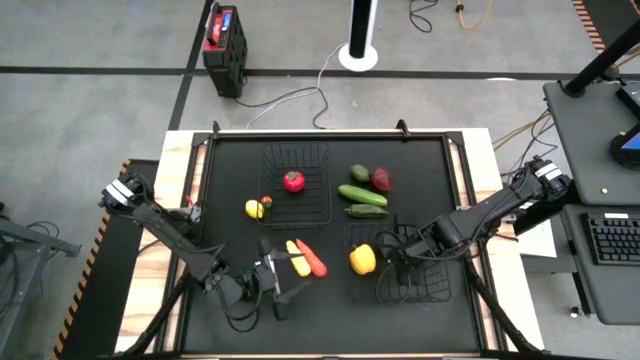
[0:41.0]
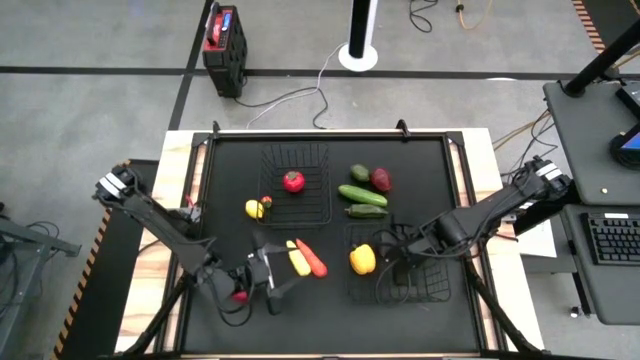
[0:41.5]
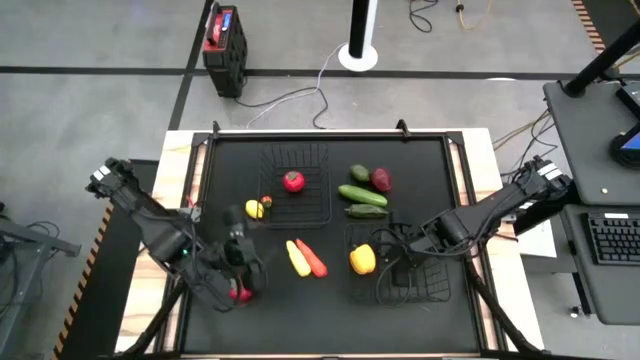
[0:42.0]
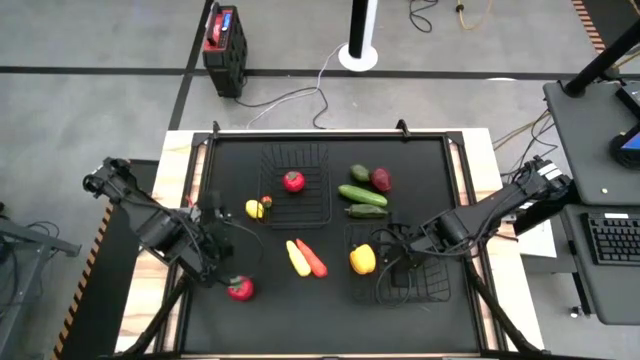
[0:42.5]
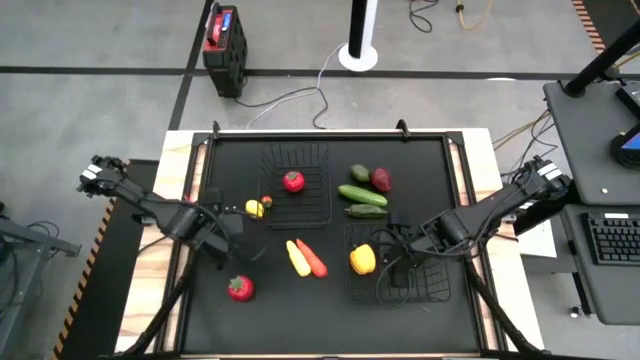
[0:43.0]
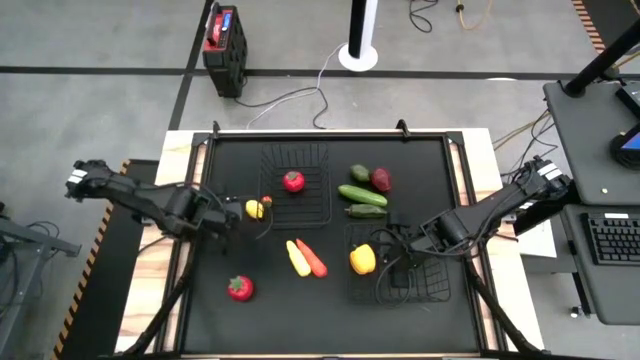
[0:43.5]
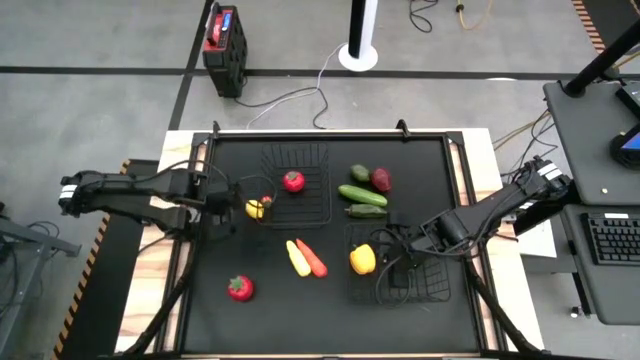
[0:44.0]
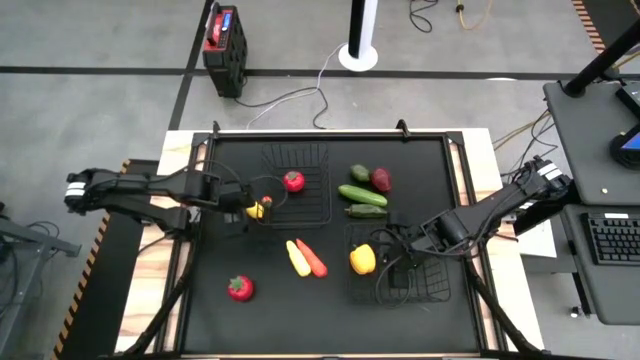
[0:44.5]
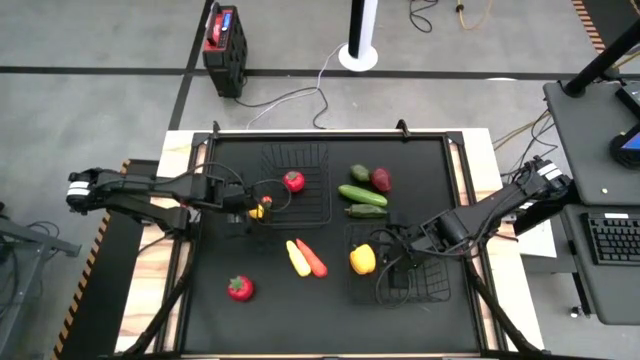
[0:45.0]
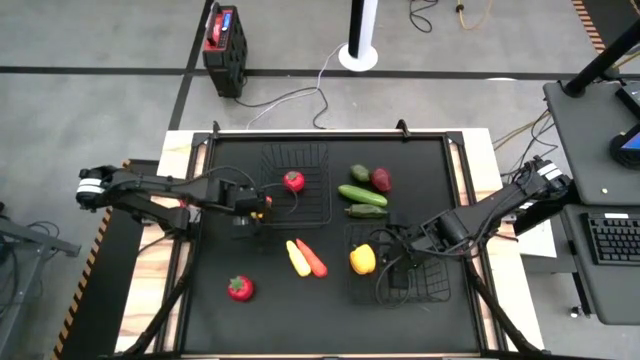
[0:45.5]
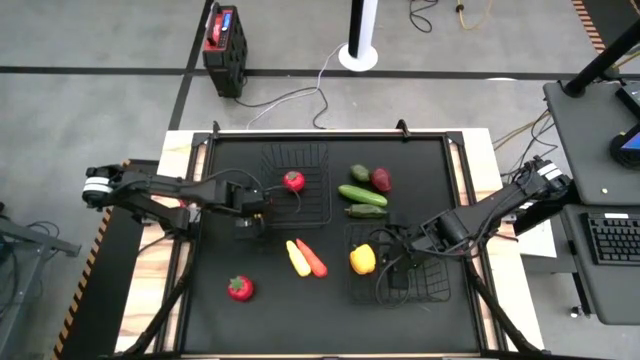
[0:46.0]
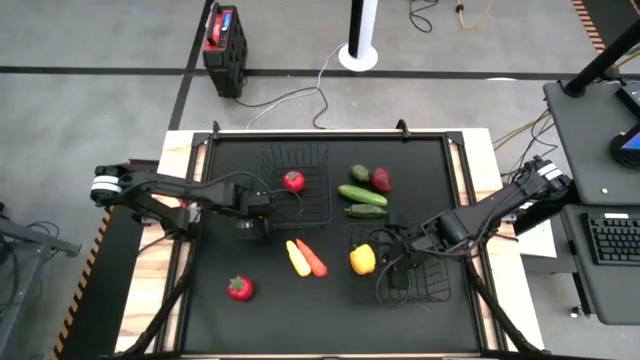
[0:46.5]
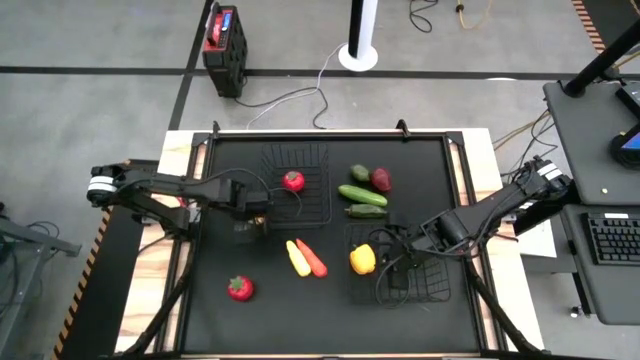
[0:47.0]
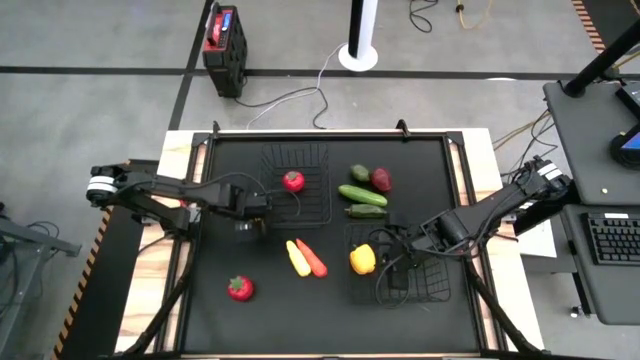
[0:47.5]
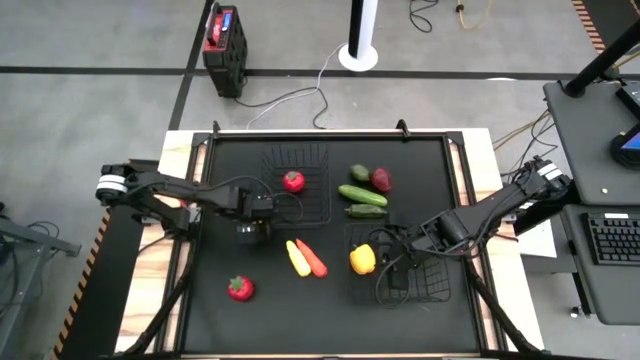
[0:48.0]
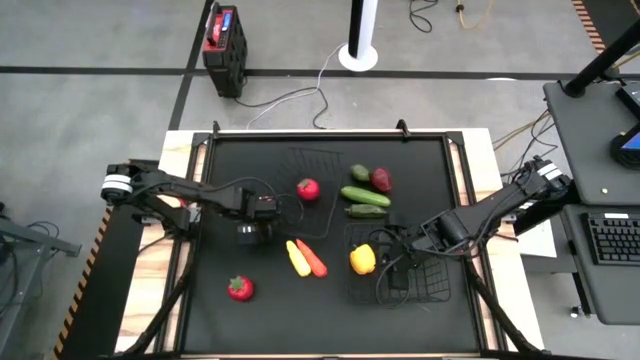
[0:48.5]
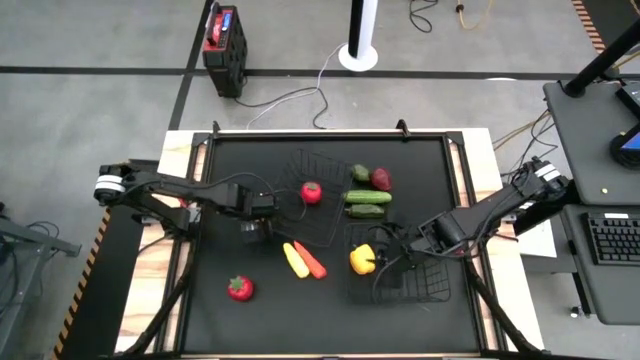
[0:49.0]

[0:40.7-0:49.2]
Task: Sort produce into baskets
Put the yellow lemon into the top black wire basket

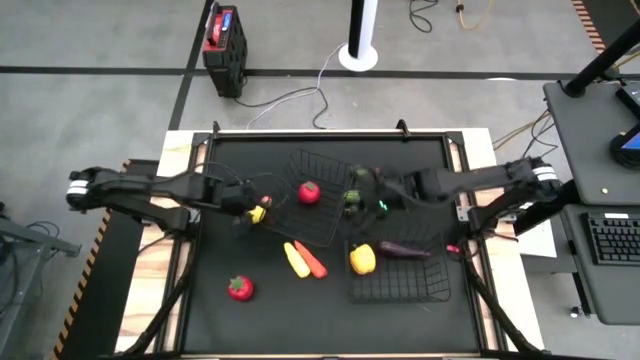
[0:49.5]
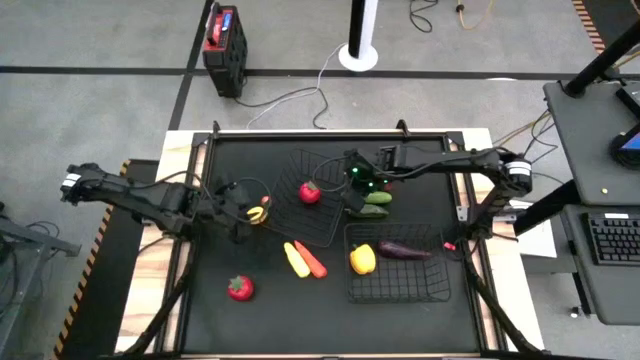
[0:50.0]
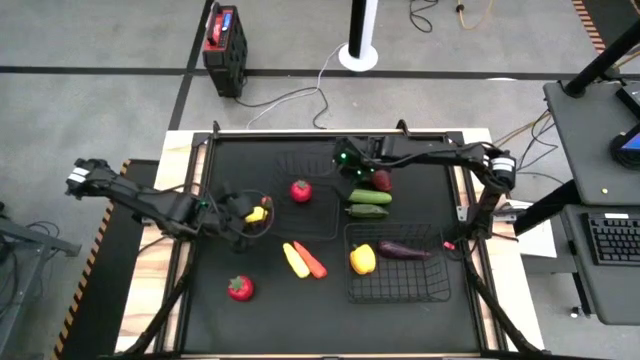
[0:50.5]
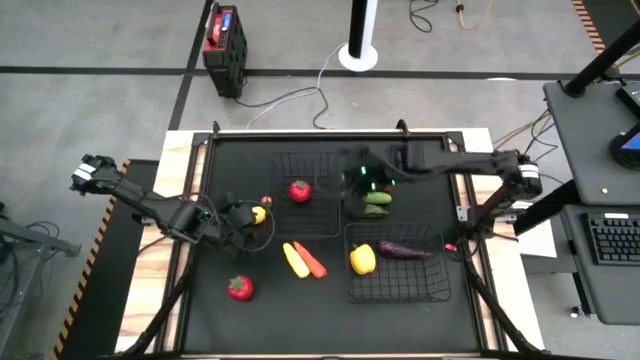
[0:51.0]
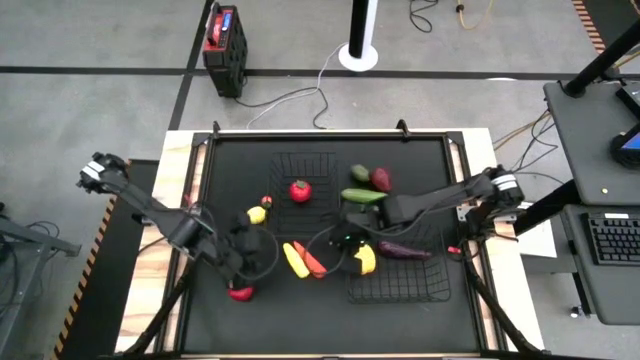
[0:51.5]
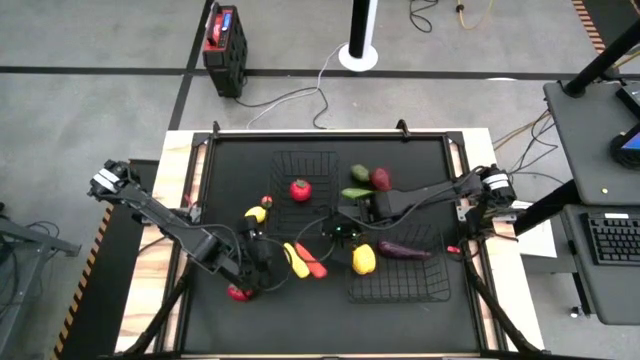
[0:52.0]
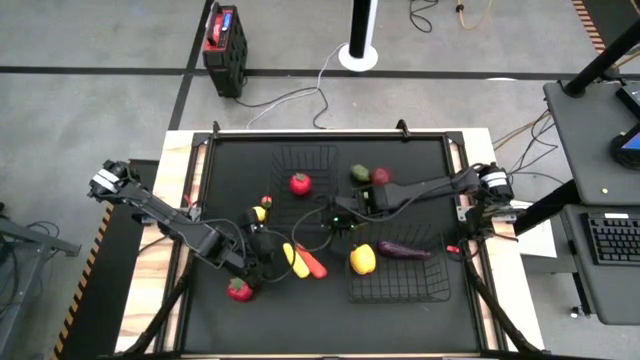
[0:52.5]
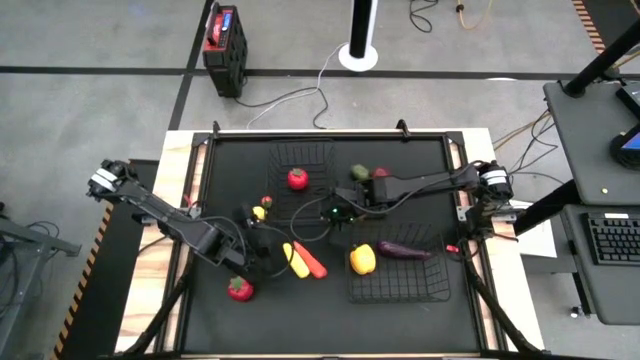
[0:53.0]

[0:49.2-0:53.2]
Adjust the top black wire basket

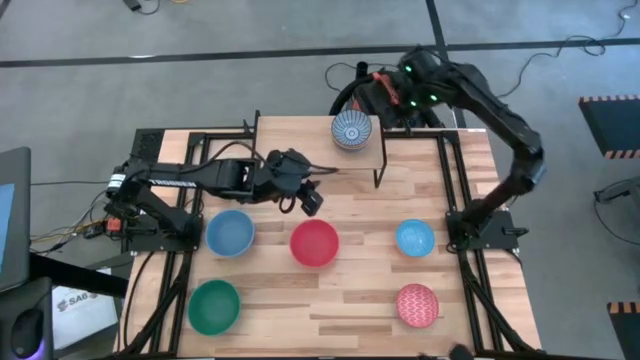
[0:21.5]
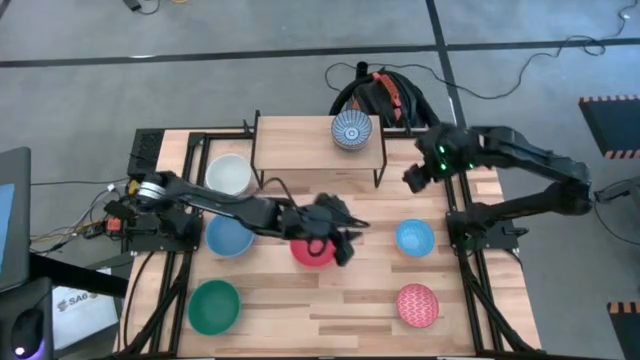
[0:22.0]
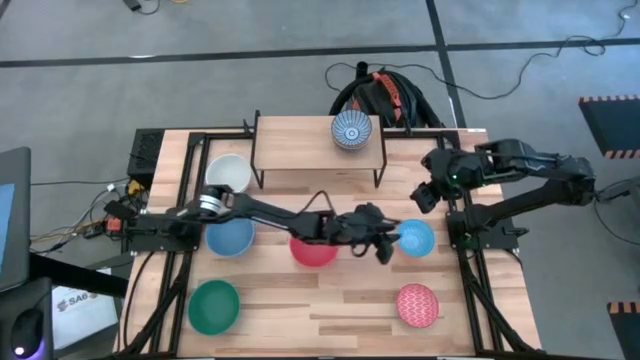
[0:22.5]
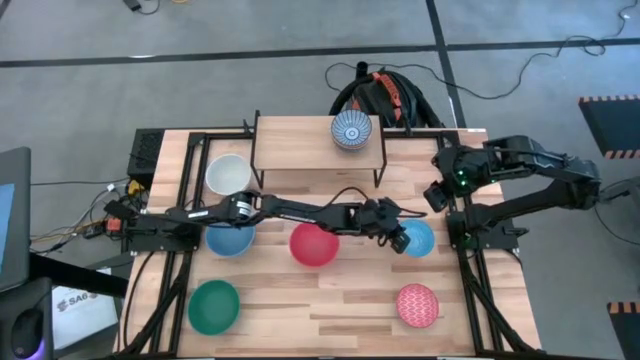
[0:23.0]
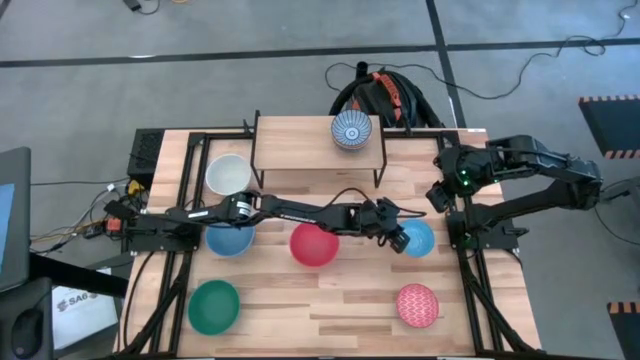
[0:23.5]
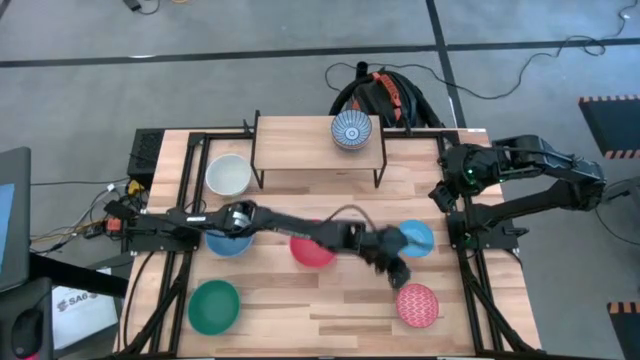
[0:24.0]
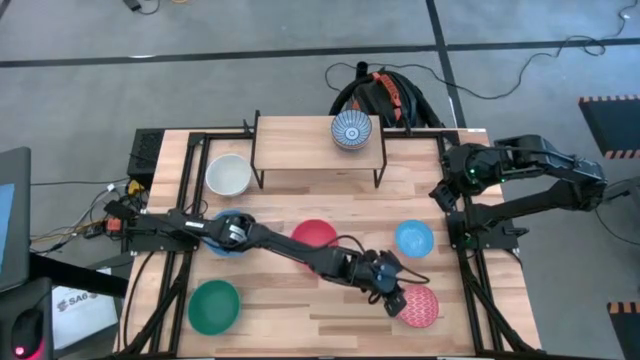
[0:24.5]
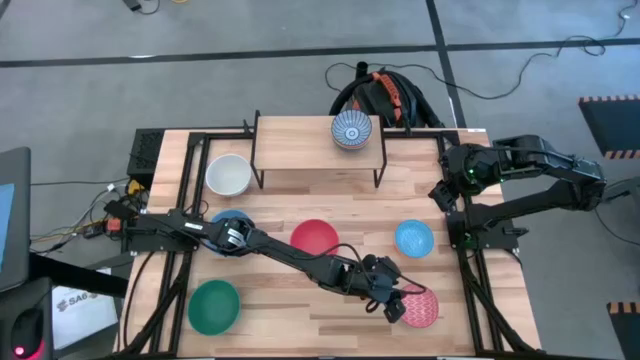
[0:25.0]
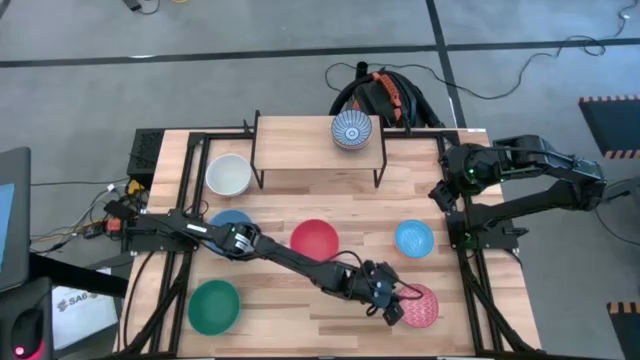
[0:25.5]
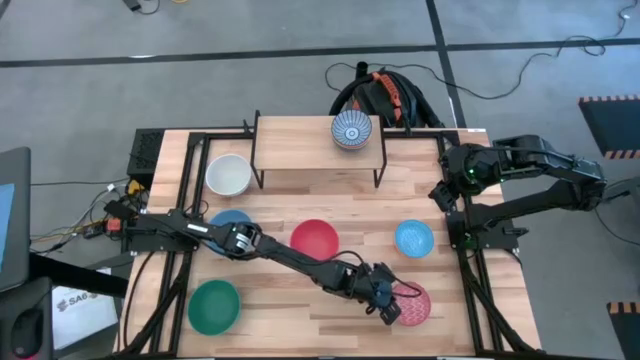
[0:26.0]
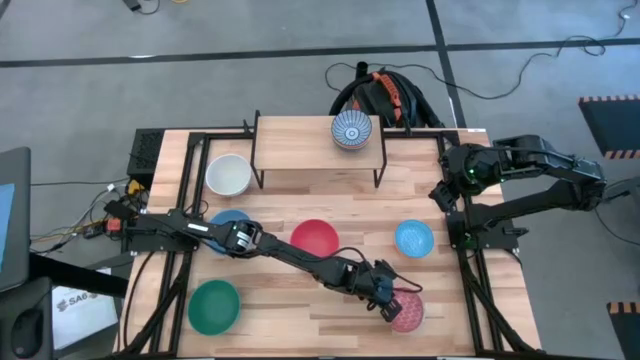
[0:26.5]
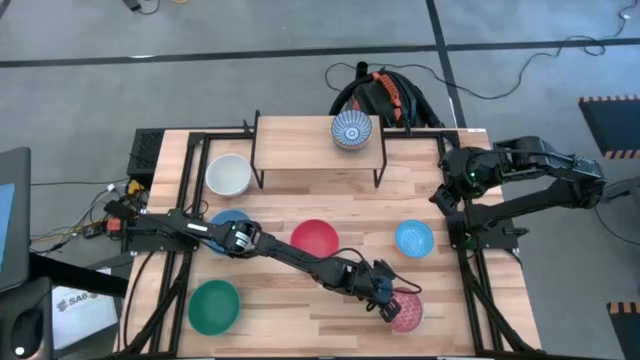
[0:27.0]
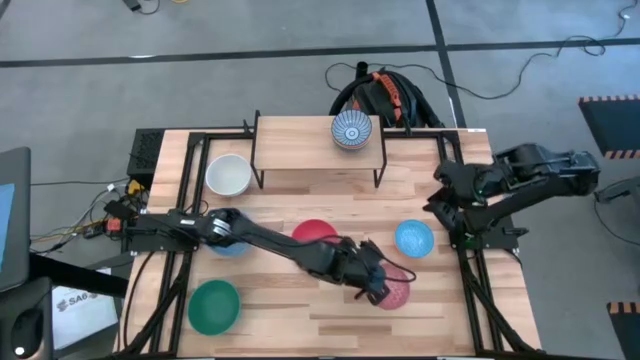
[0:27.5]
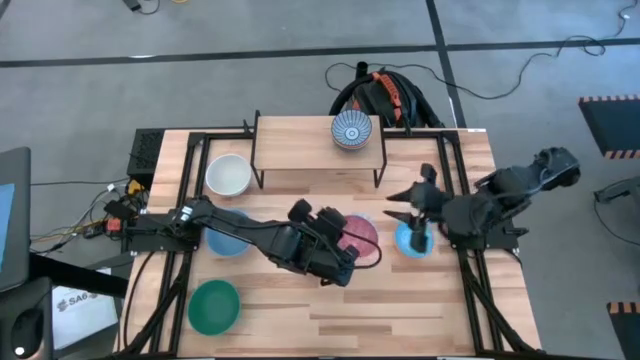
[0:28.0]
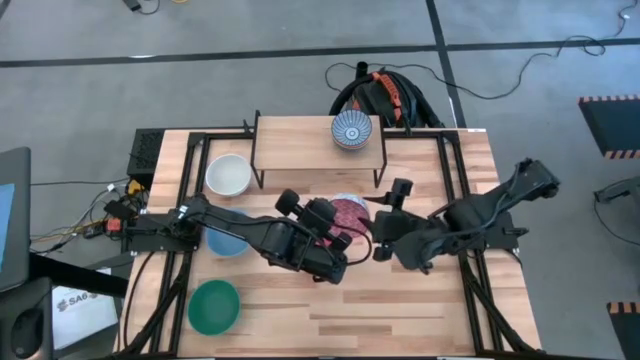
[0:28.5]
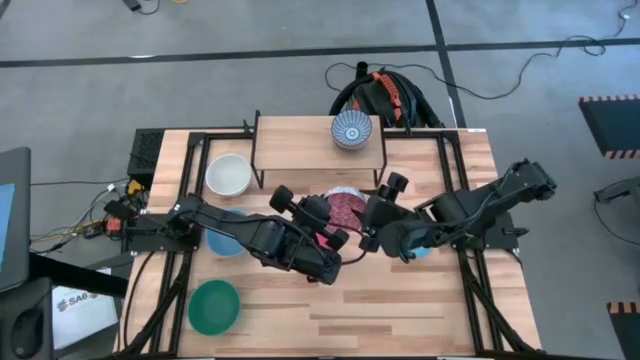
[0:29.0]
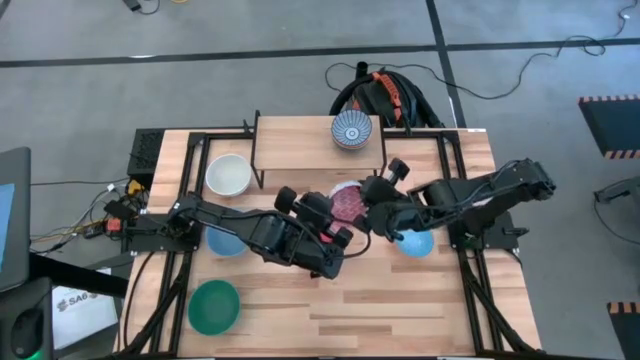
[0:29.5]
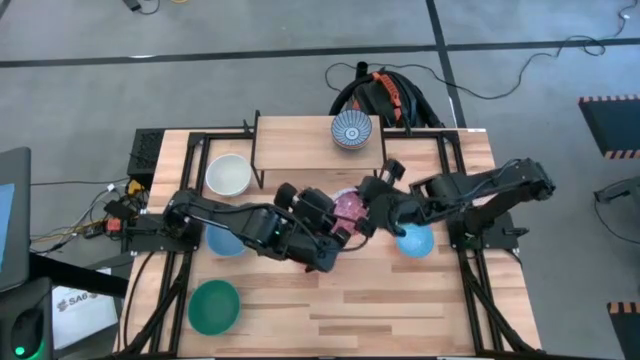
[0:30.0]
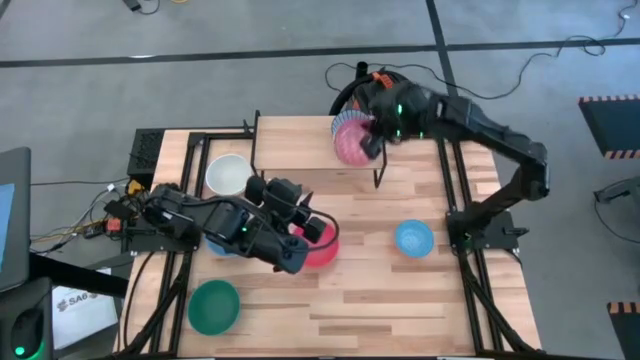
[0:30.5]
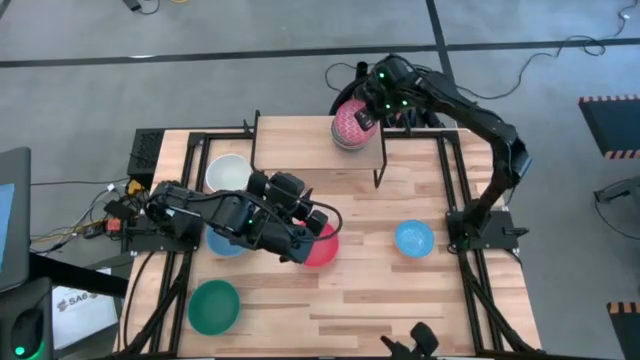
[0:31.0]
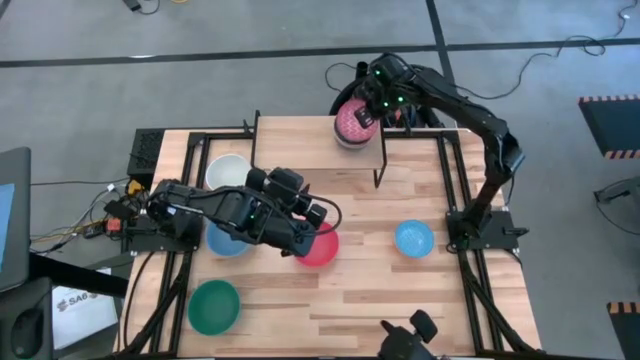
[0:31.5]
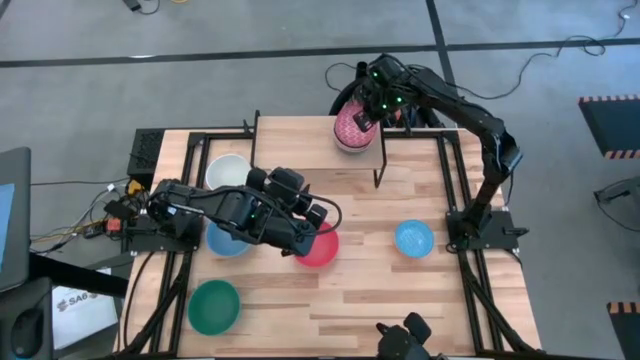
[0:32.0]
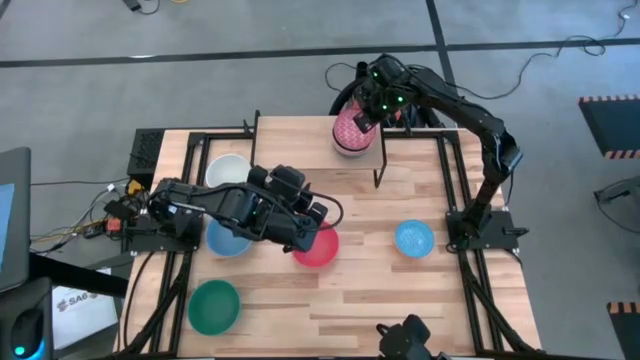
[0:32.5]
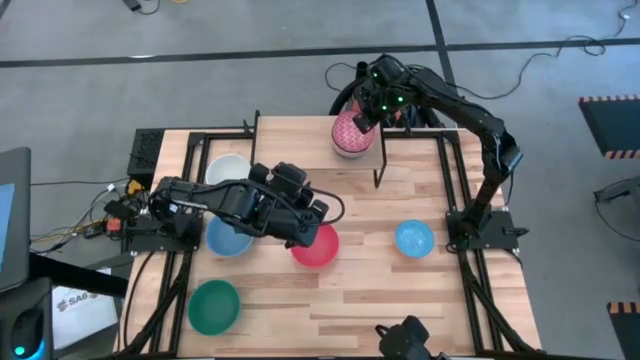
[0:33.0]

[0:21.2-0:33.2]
Task: Place and stack bowls onto a shelf
Stack the red patterned bowl on top of the blue patterned bowl on the shelf
